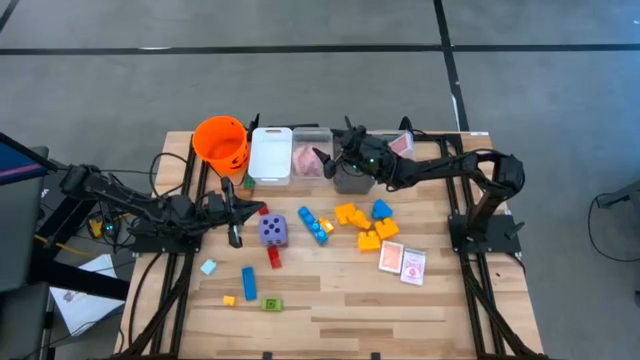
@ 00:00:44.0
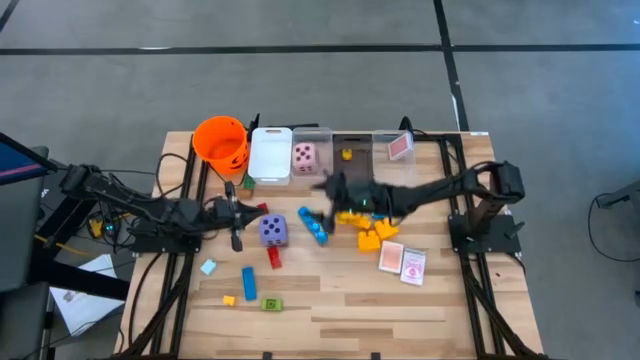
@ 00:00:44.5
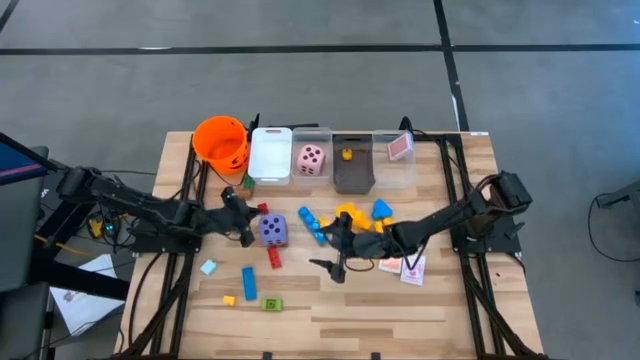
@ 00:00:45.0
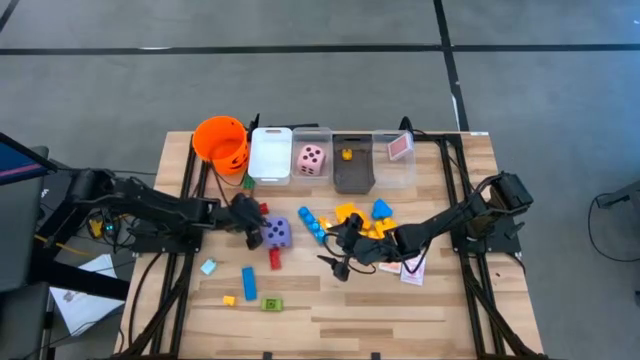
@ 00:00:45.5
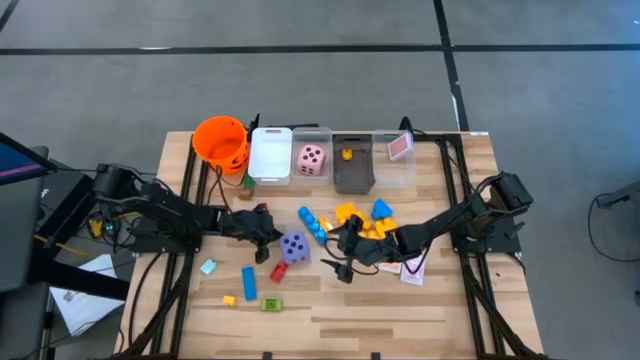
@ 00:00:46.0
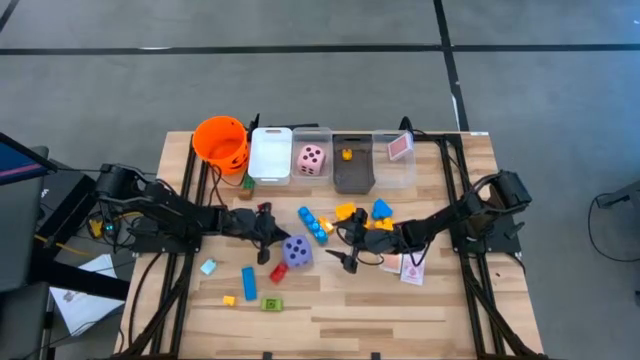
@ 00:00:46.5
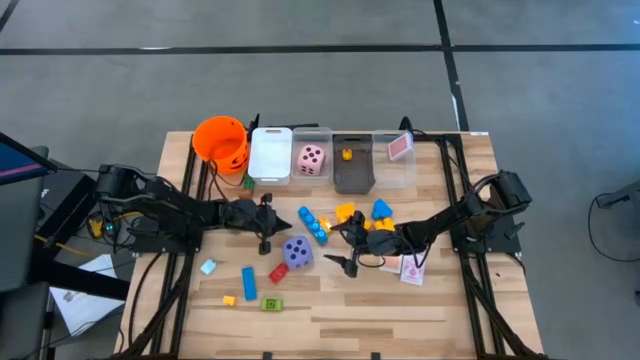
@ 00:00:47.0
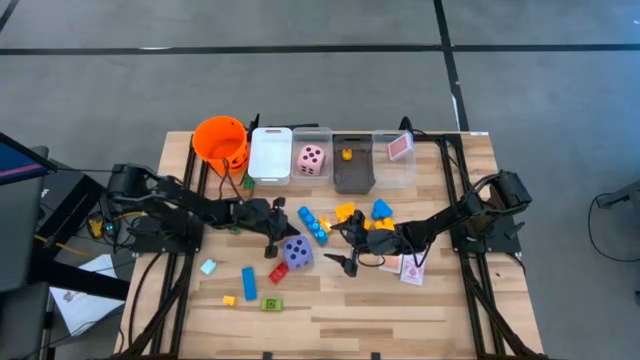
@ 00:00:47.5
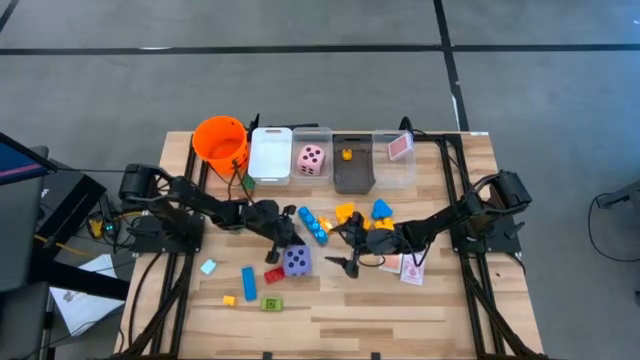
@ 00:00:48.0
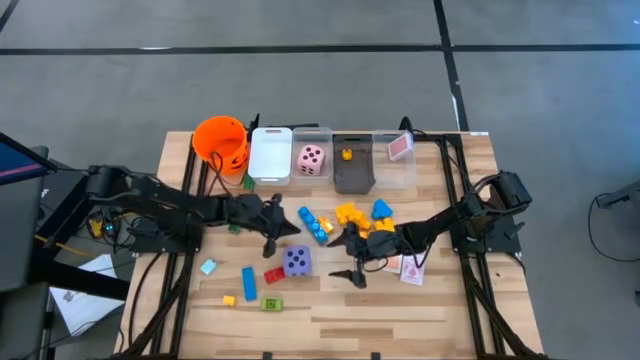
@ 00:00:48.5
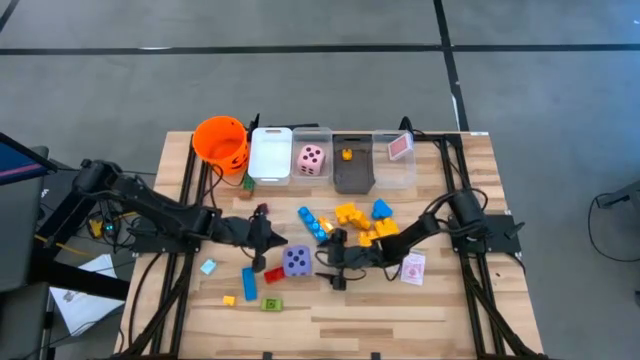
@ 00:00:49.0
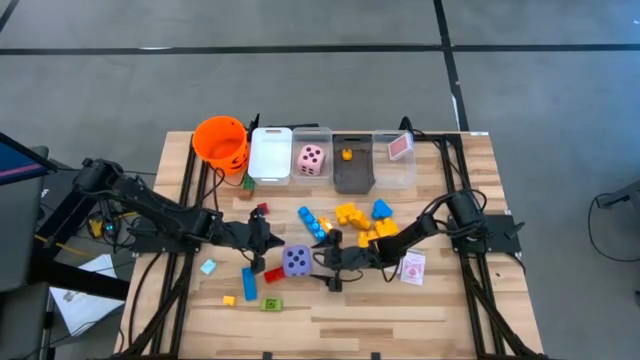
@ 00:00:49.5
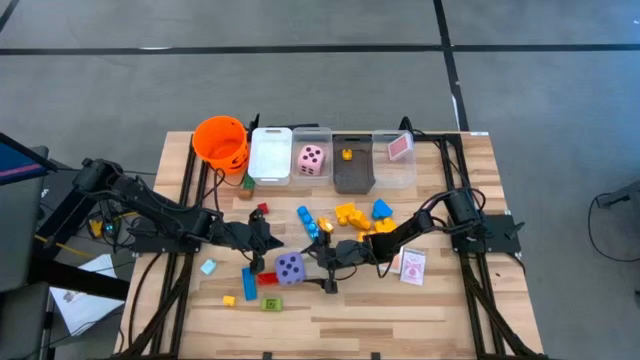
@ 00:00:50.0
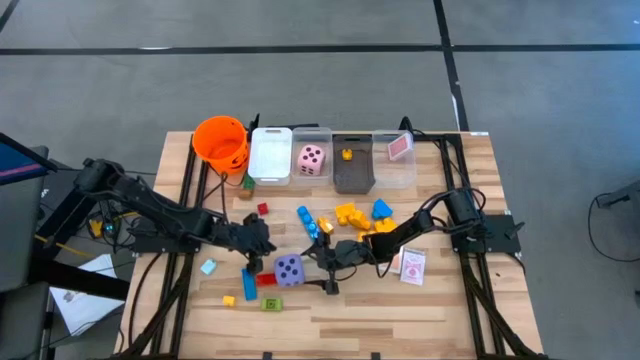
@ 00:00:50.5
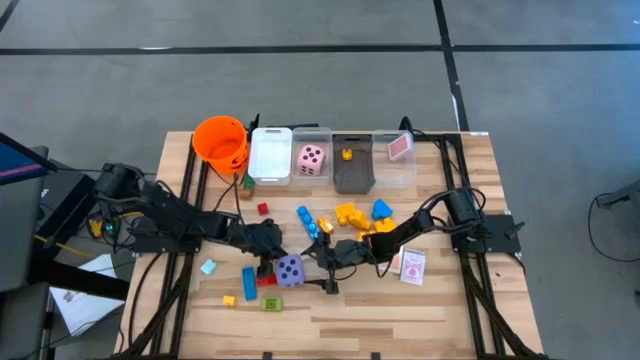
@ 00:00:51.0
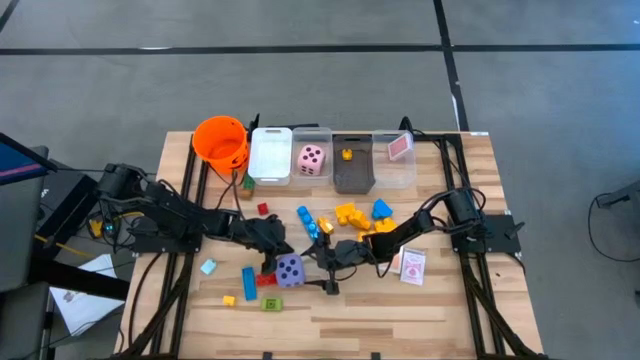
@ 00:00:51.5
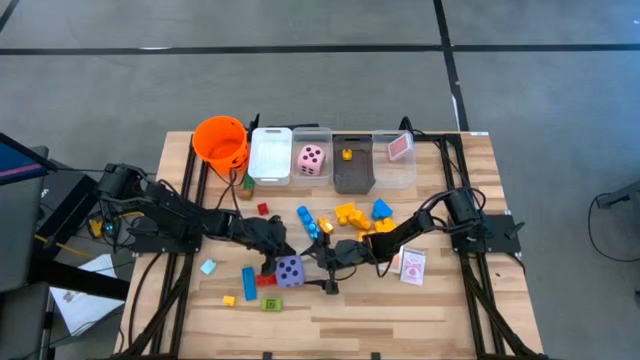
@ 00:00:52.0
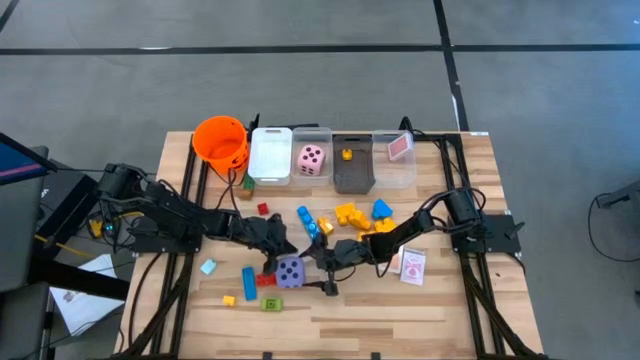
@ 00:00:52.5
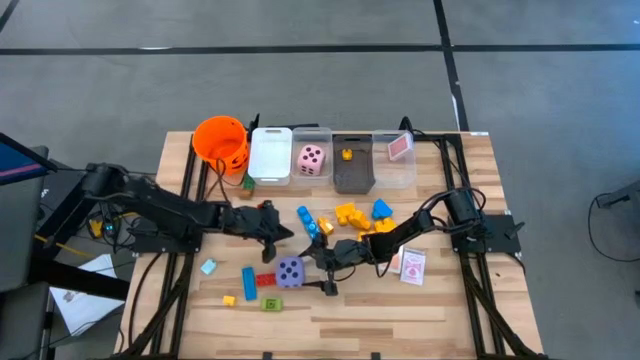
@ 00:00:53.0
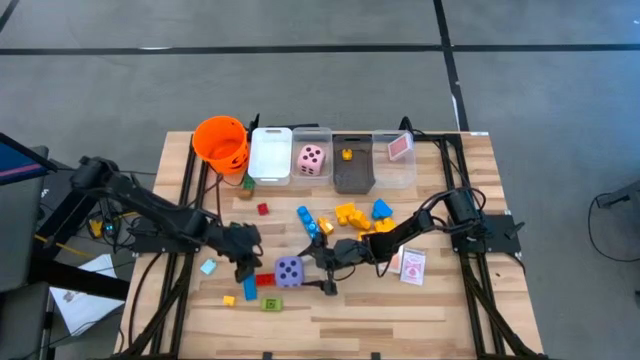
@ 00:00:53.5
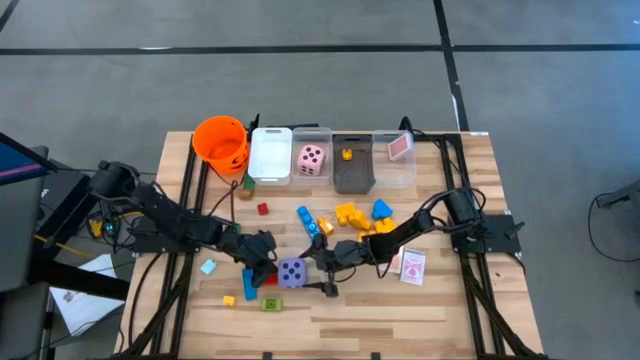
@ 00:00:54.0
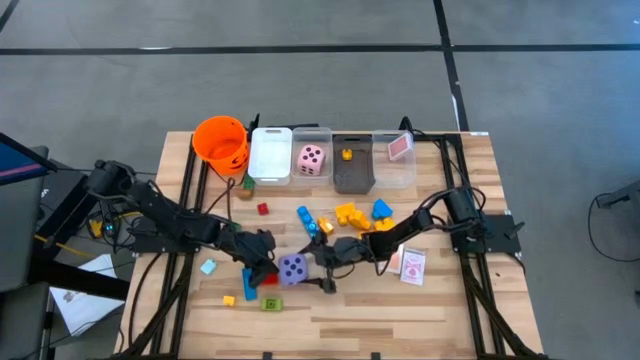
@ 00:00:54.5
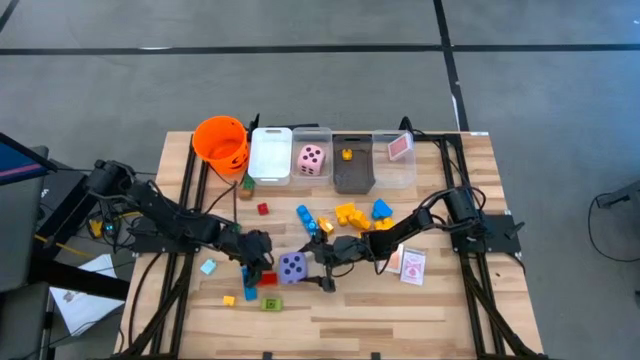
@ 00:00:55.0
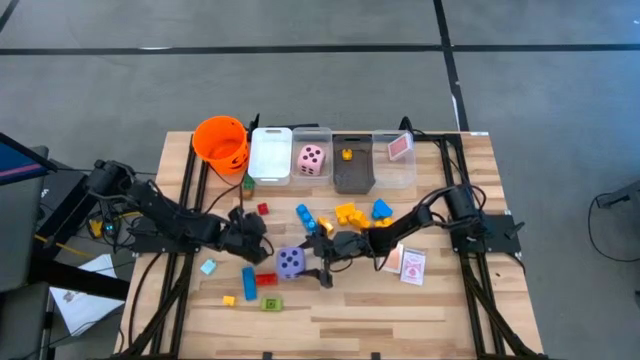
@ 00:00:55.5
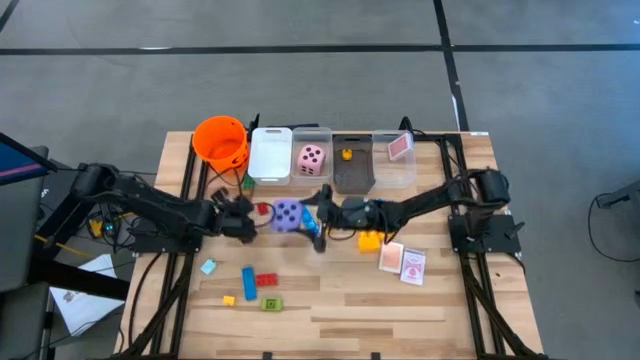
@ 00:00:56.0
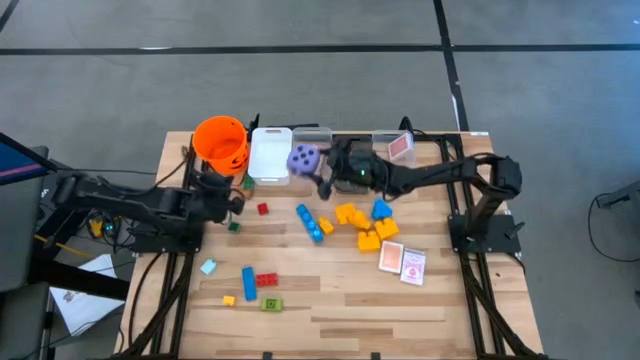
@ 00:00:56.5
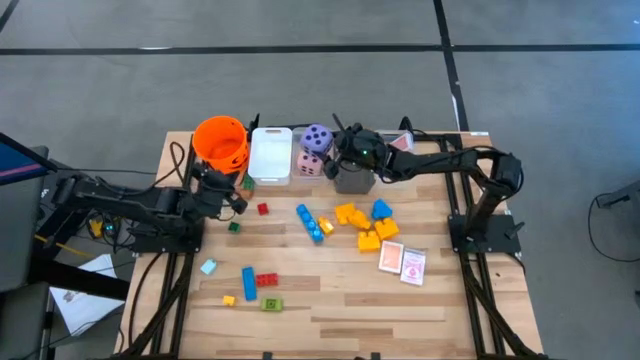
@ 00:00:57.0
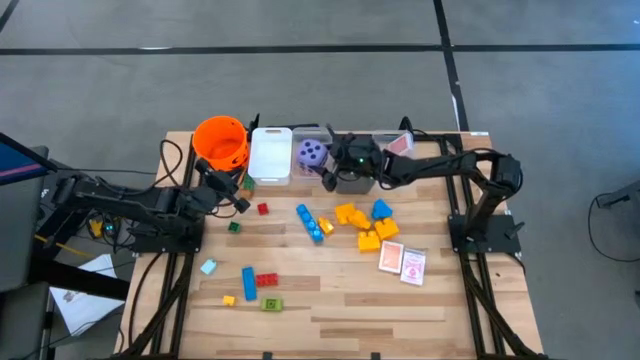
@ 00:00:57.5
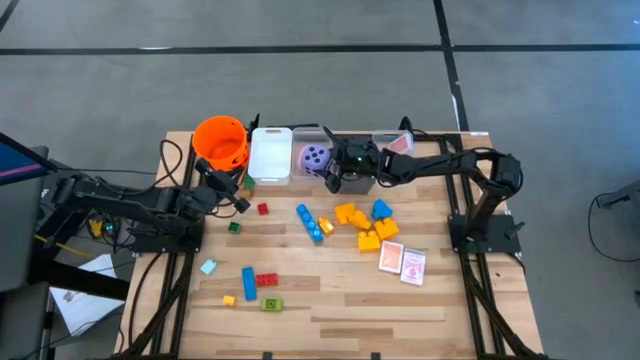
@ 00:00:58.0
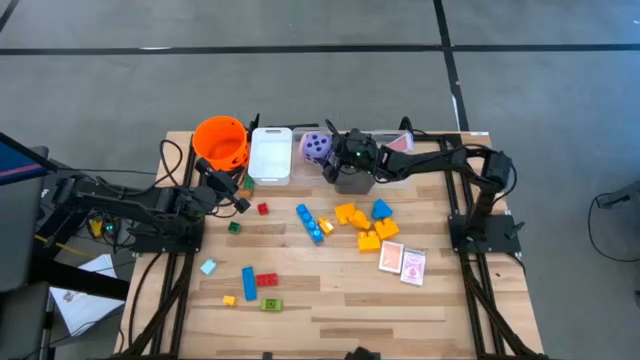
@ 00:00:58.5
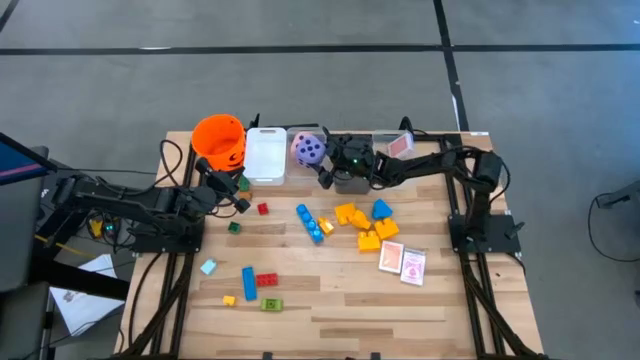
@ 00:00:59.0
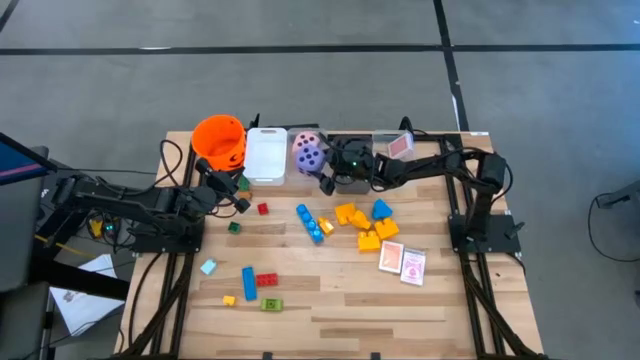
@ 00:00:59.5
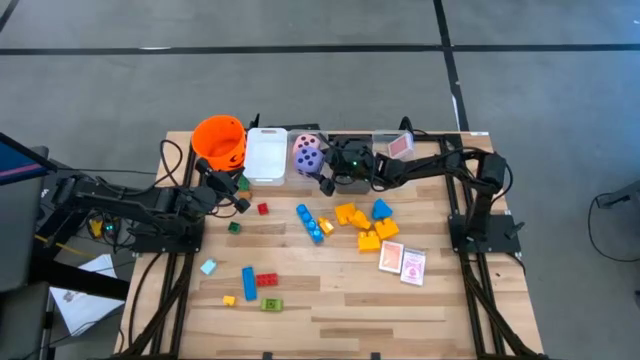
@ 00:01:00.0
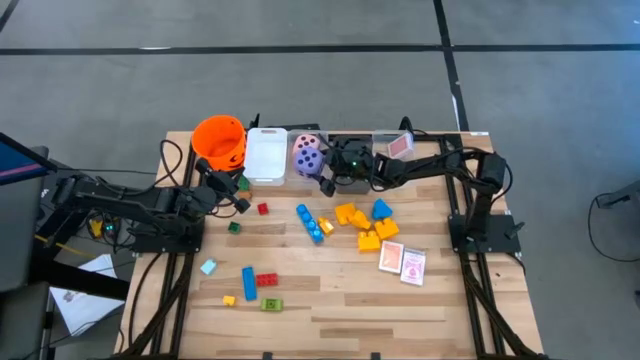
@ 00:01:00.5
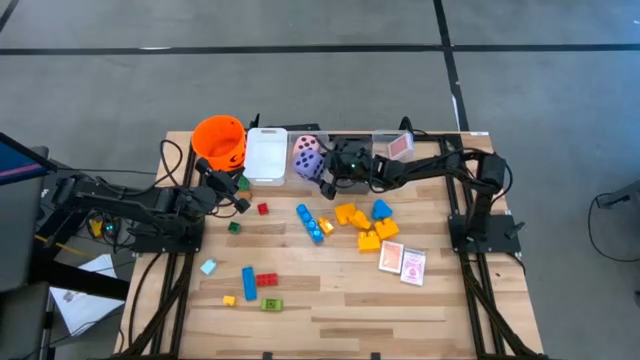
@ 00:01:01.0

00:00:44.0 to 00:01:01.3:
Task: Pick & Place Toys
Put the purple die into the left transparent bin

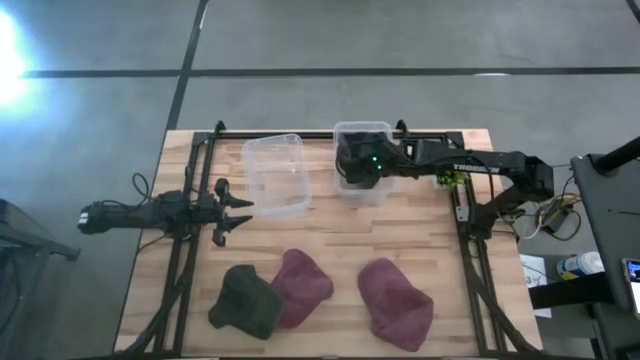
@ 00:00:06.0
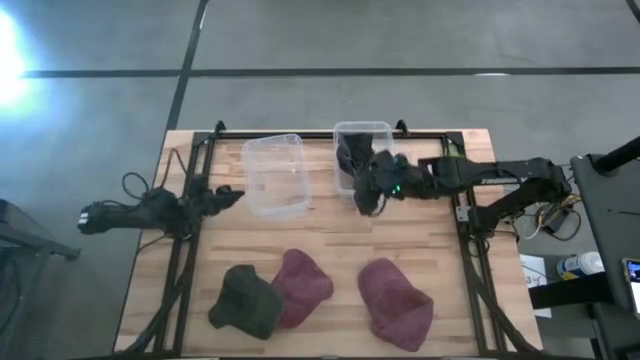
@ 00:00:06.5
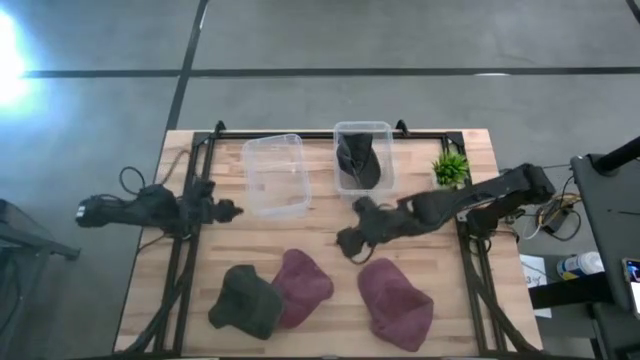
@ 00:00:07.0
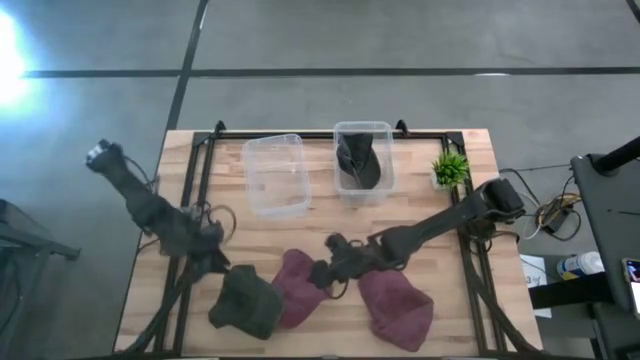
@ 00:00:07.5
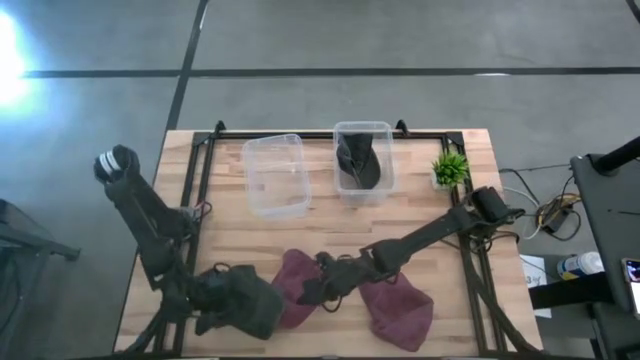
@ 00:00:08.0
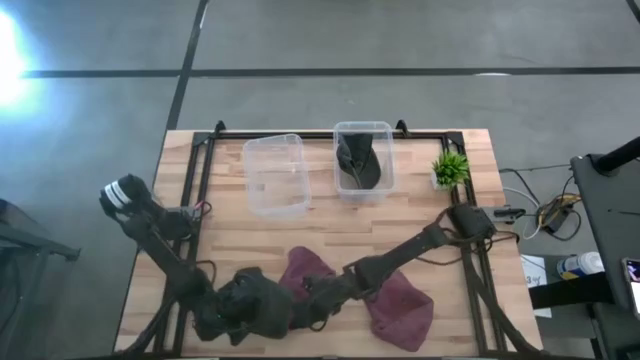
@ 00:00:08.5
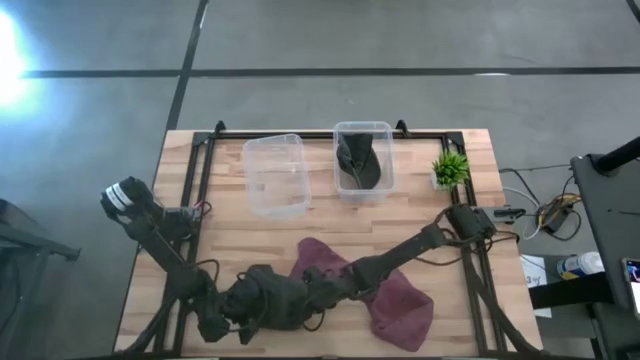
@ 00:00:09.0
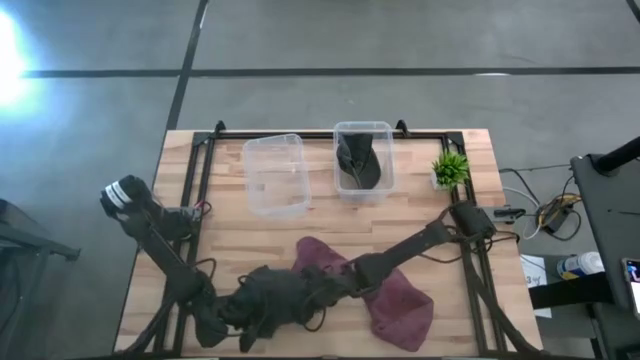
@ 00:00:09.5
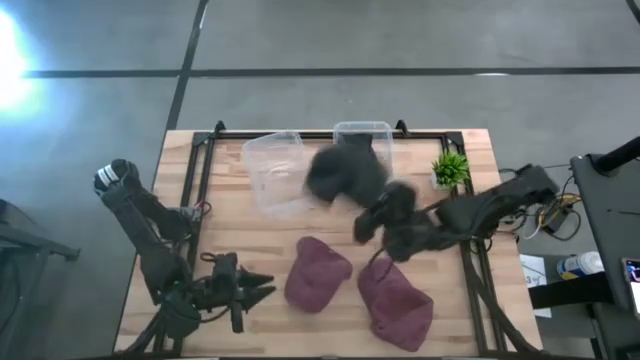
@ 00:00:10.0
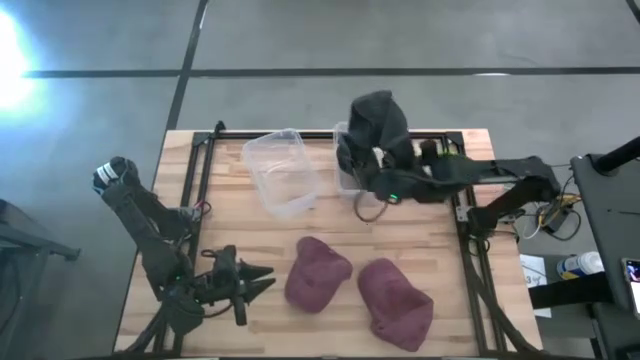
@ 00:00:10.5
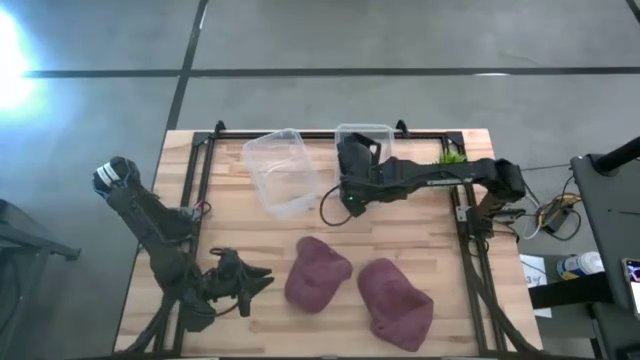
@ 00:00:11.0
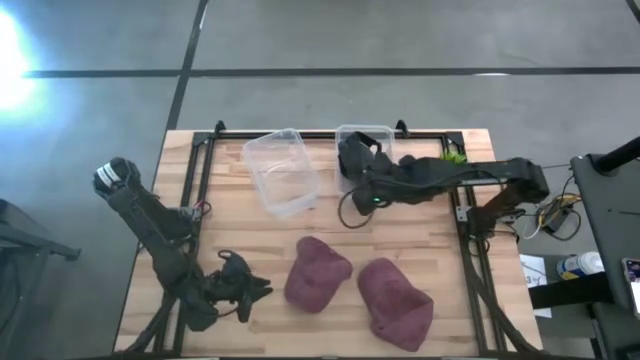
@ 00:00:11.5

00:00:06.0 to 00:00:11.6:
Task: Pick & Place hat
Put the black cap into the right transparent bin
